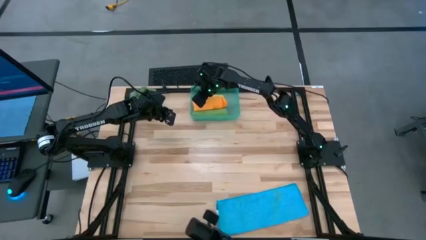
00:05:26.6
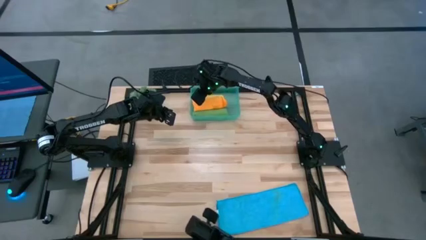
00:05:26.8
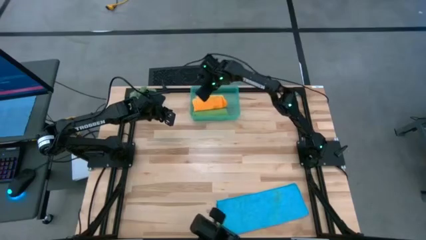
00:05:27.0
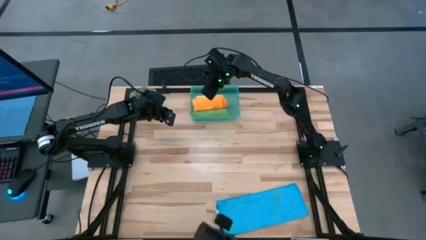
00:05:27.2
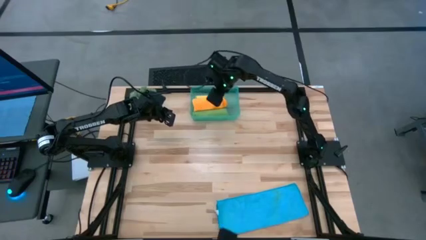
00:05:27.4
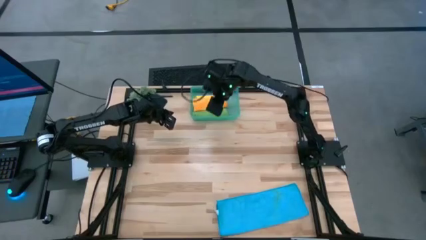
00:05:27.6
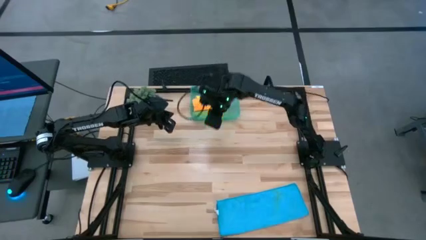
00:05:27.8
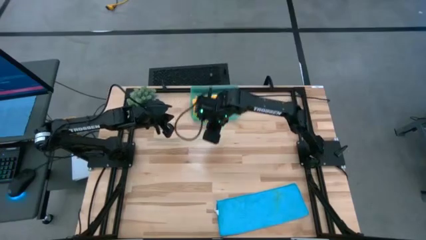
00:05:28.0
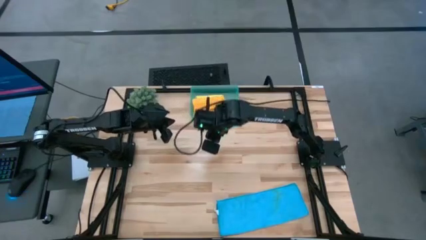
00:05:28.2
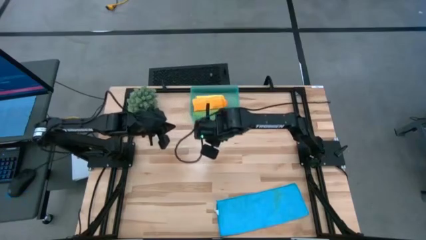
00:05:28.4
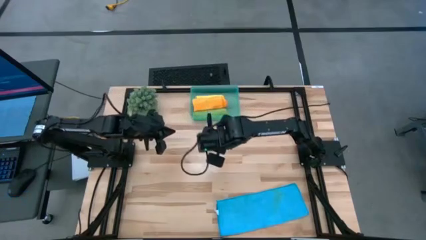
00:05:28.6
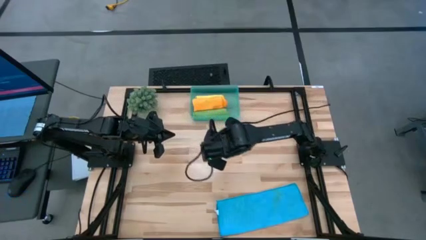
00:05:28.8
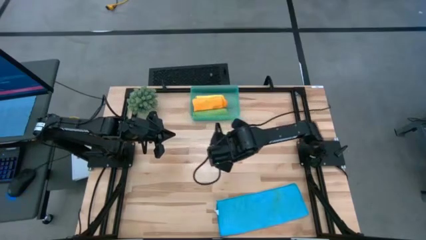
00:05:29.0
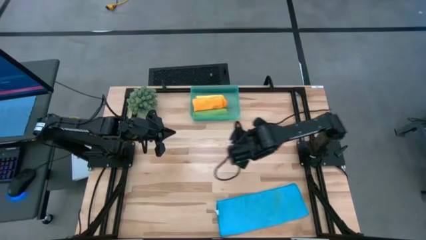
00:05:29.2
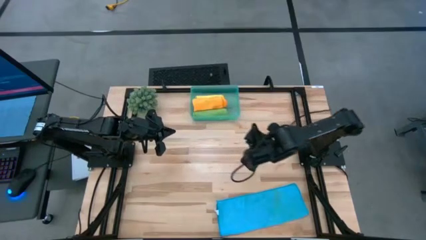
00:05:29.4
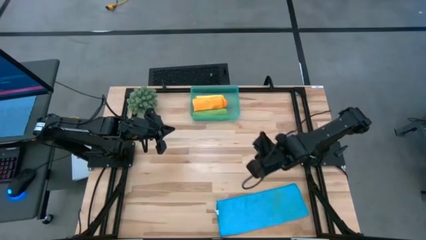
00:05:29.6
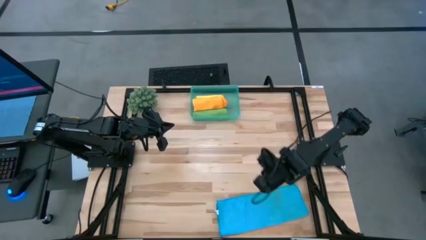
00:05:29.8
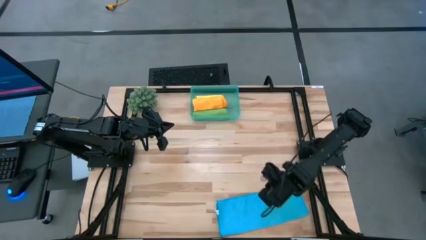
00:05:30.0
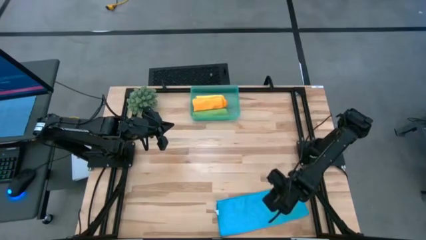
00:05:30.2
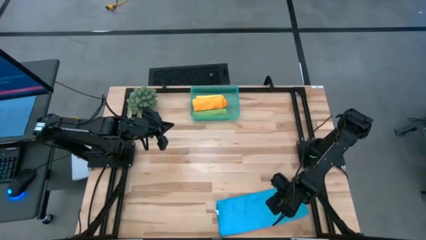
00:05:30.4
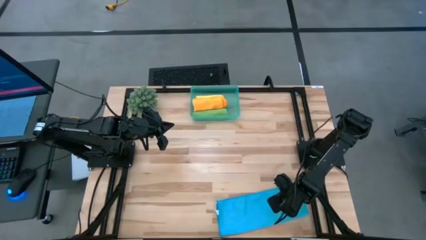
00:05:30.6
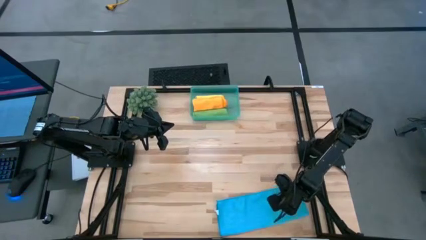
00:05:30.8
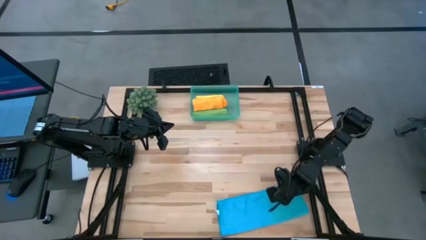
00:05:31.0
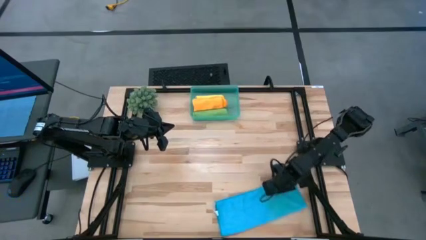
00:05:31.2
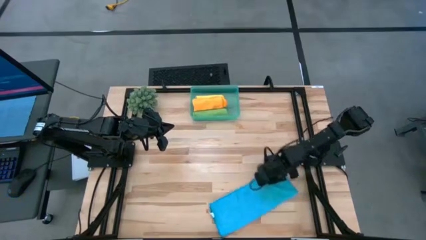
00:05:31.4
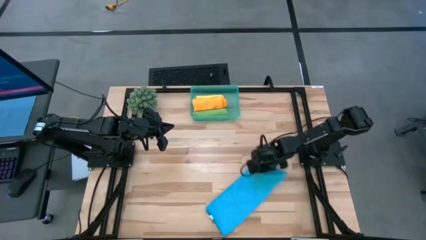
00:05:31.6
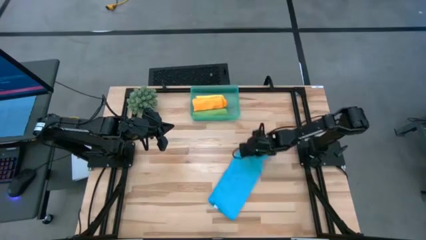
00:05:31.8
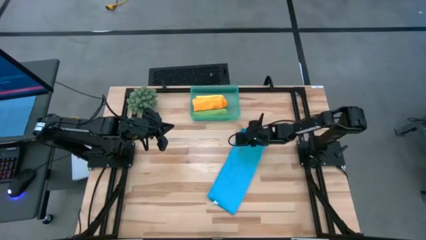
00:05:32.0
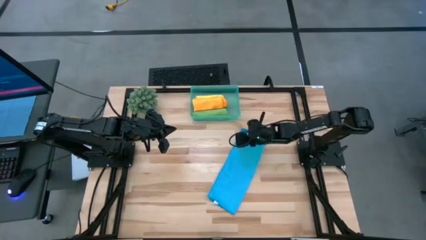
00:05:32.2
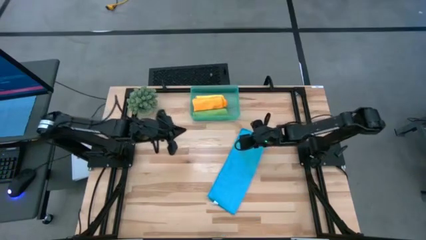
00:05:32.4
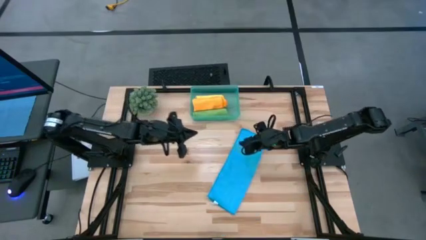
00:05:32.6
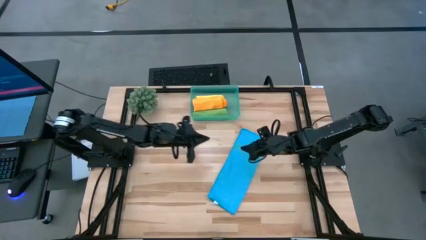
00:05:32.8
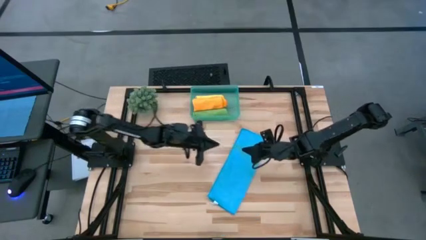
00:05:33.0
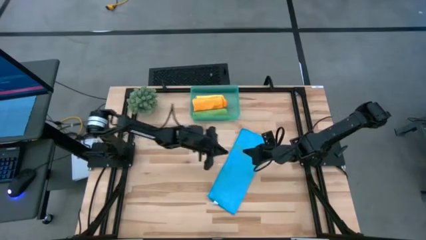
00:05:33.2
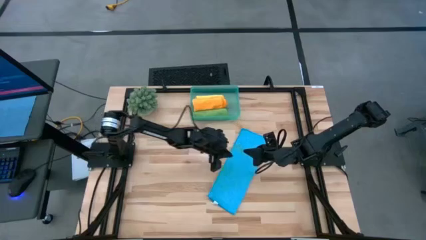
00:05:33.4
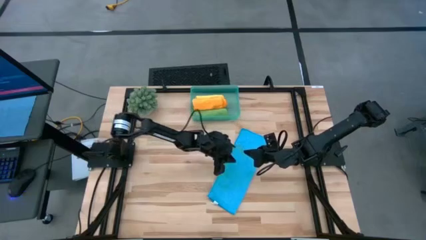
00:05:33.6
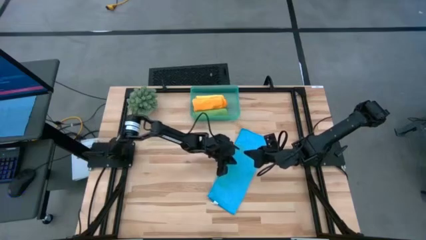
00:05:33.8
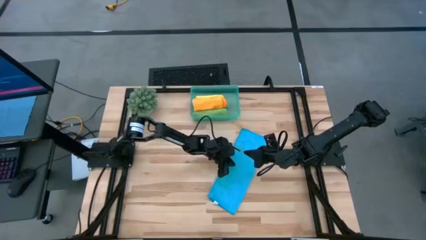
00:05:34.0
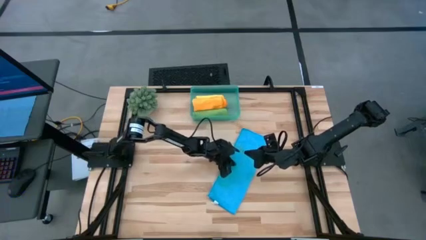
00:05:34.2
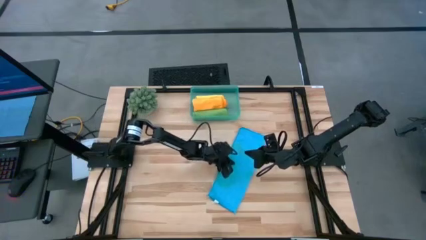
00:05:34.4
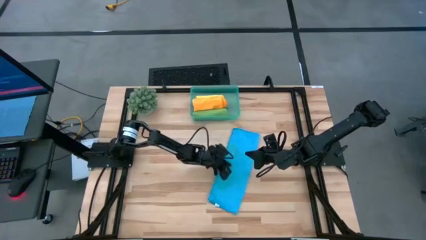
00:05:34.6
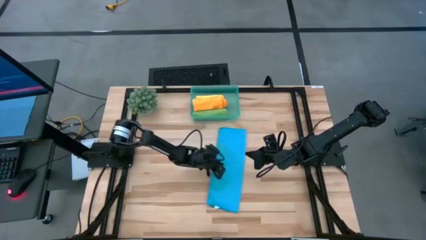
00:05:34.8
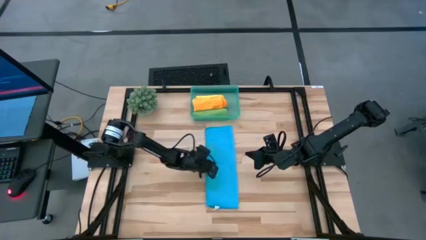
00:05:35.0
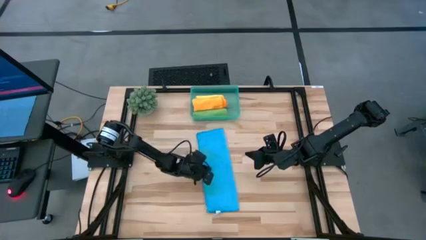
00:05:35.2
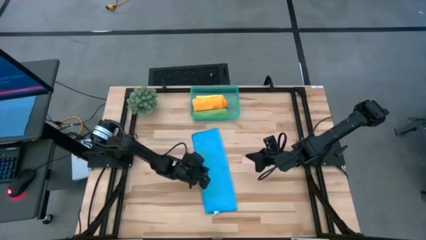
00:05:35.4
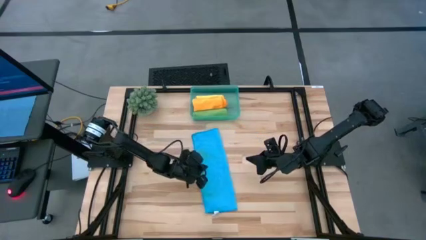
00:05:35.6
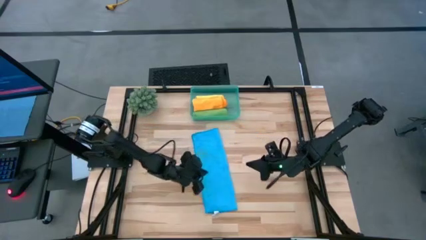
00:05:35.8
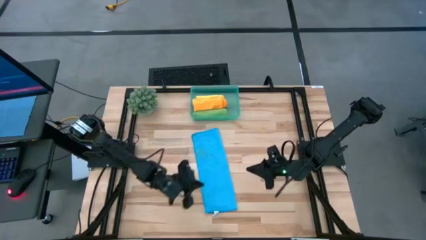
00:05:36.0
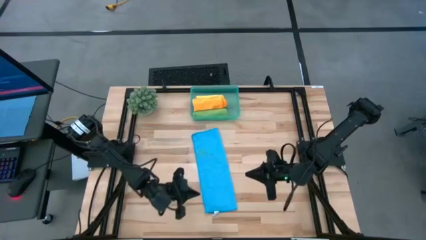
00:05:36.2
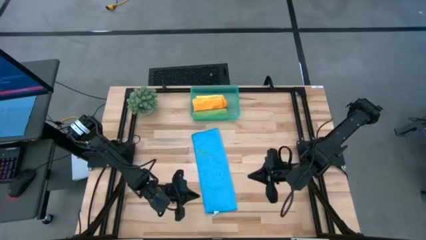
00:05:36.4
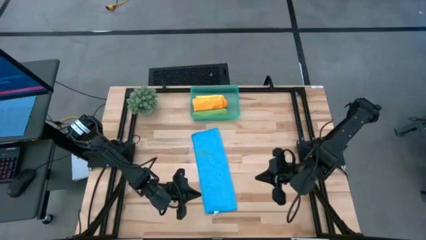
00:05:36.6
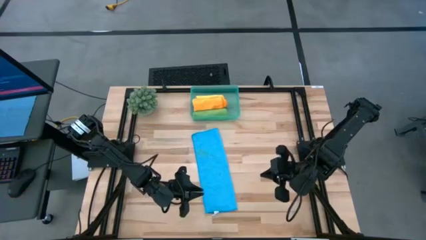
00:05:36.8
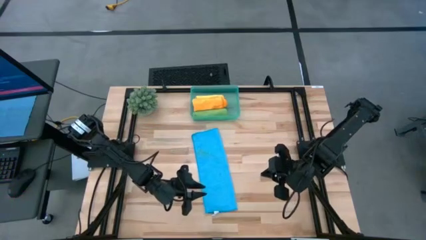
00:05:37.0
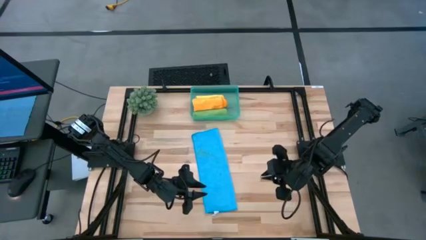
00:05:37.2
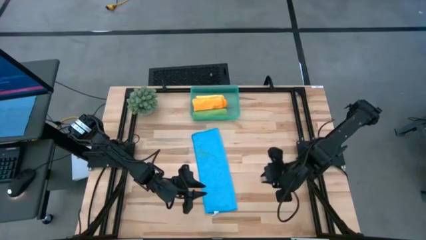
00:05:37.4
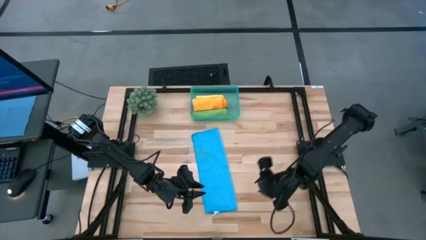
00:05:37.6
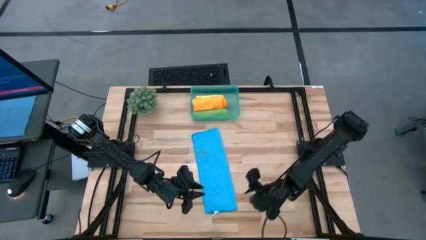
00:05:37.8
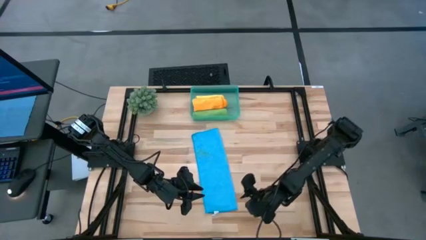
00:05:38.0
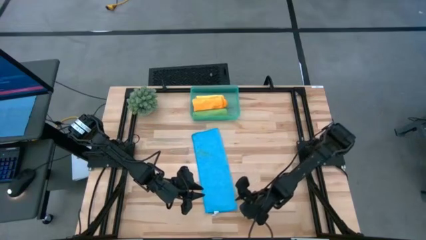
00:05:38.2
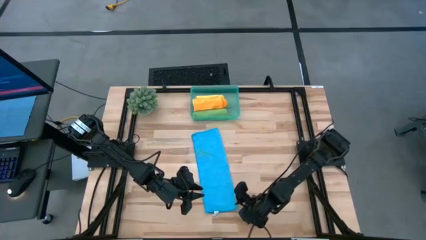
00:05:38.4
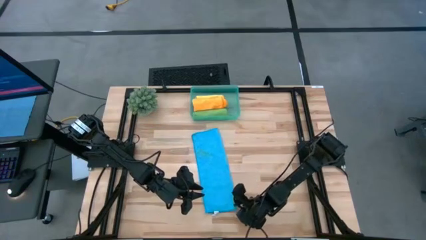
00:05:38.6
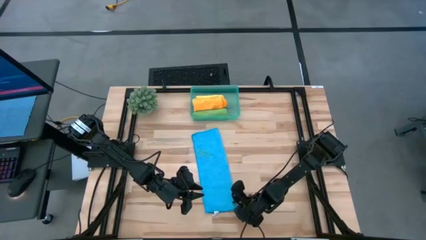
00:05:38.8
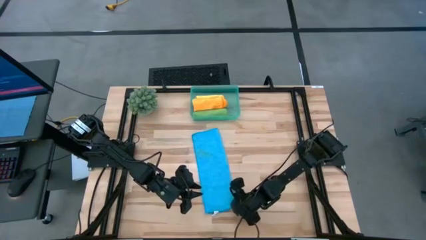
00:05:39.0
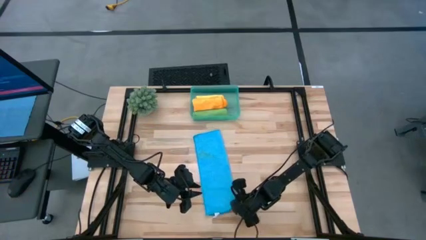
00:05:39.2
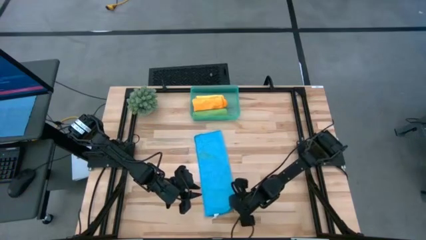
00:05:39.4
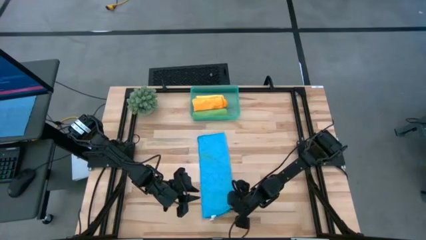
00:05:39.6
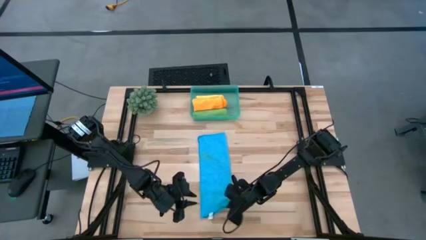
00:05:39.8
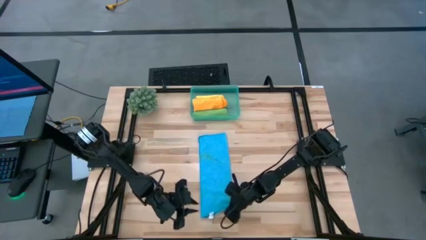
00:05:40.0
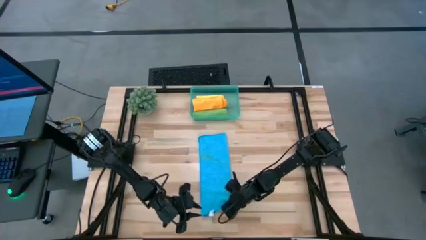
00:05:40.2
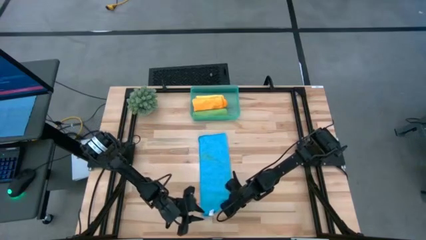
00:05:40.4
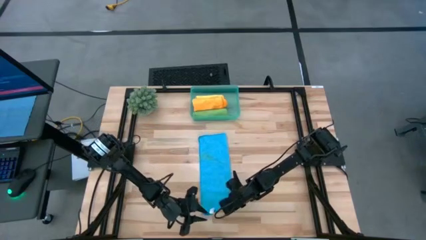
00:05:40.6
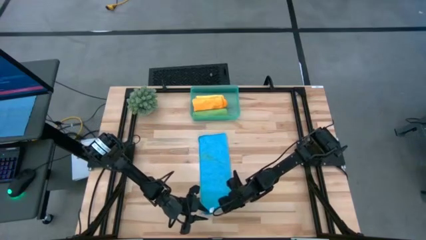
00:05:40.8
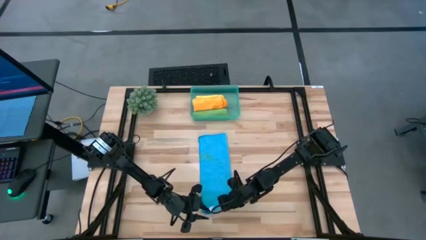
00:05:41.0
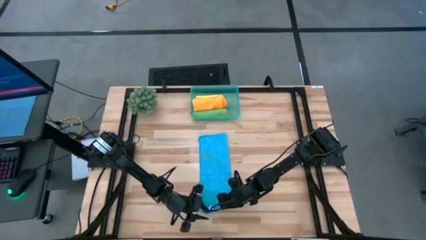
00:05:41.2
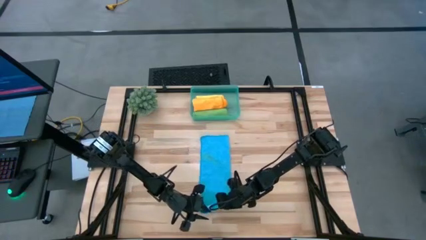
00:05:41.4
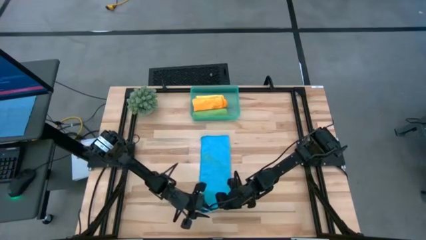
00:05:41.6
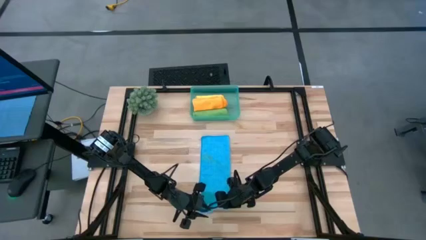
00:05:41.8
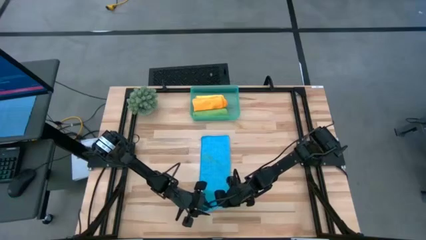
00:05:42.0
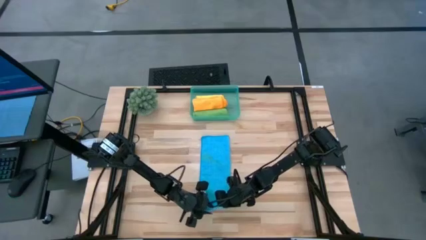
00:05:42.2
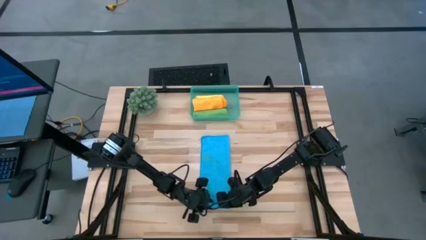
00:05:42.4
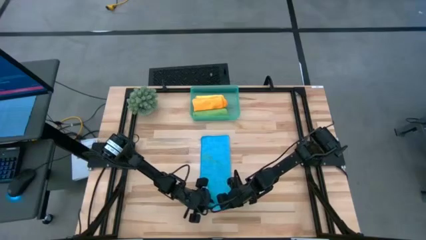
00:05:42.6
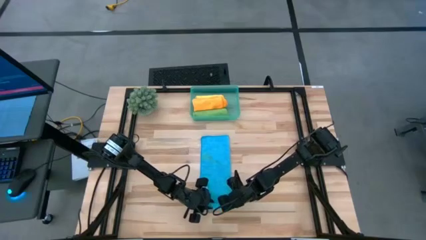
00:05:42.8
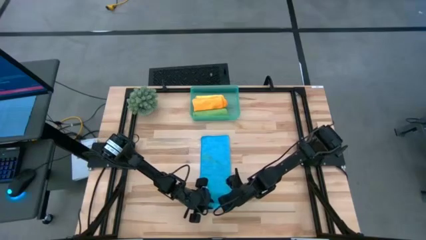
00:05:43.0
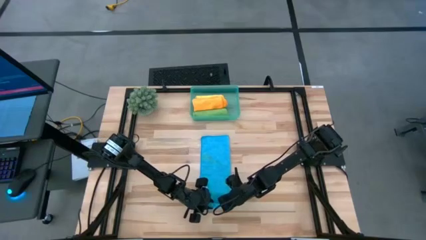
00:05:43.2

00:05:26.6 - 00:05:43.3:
Task: Roll microfiber towels into tight, uniform cylinder then place into a basket
Roll the blue towel
